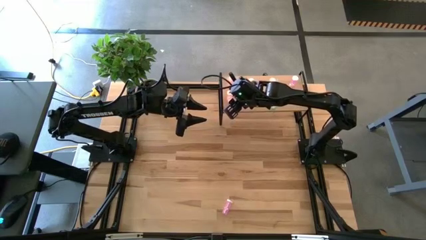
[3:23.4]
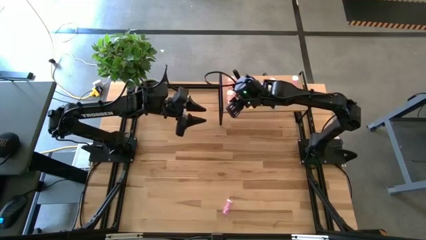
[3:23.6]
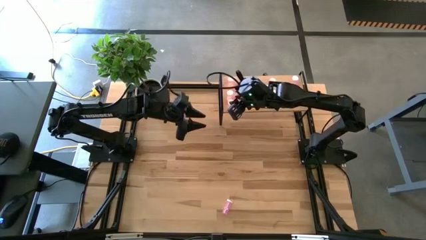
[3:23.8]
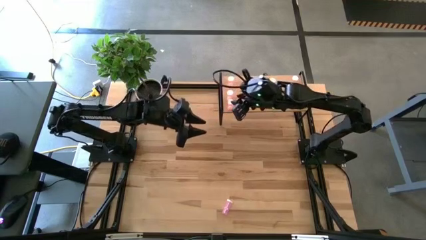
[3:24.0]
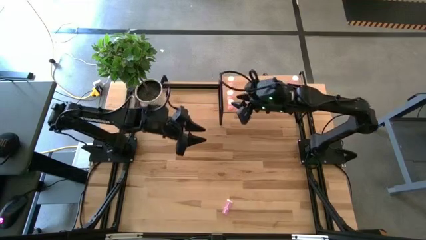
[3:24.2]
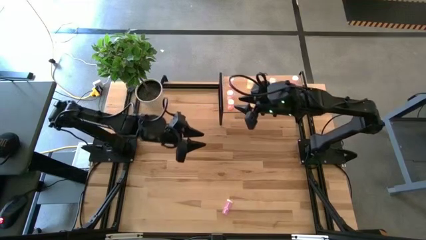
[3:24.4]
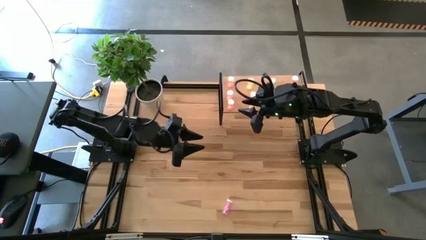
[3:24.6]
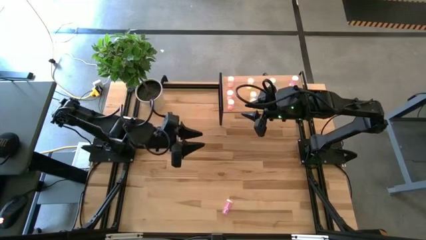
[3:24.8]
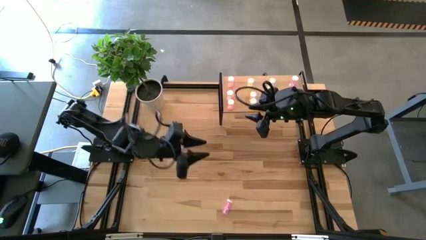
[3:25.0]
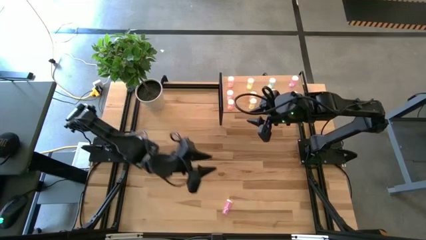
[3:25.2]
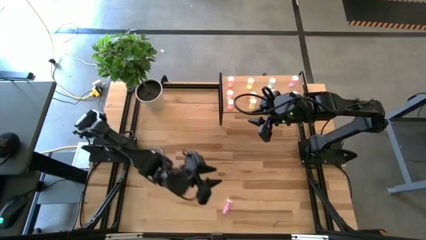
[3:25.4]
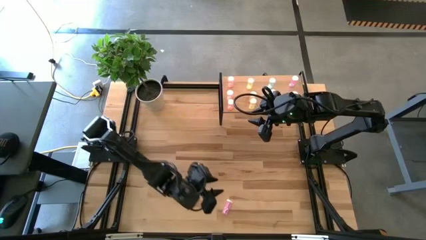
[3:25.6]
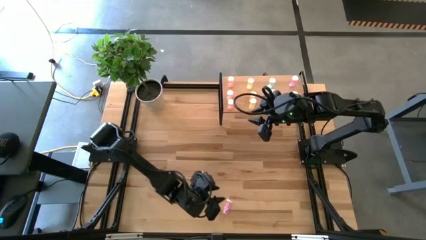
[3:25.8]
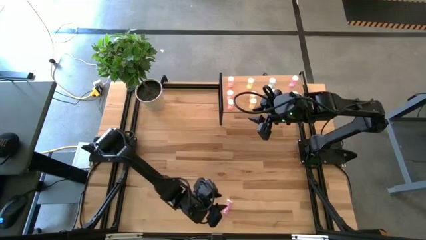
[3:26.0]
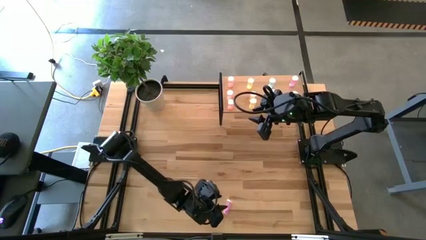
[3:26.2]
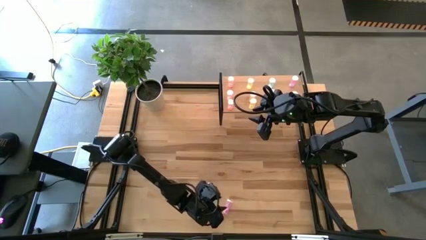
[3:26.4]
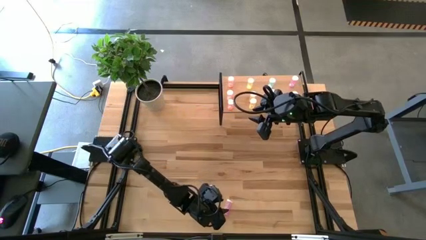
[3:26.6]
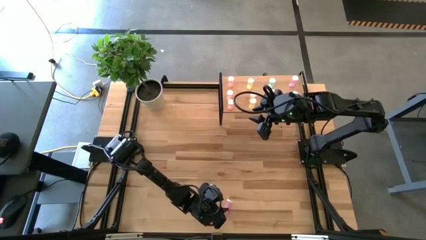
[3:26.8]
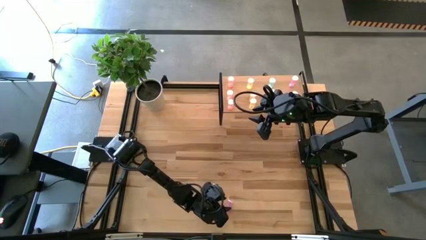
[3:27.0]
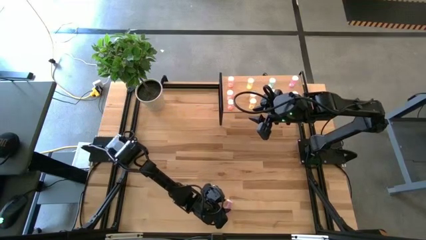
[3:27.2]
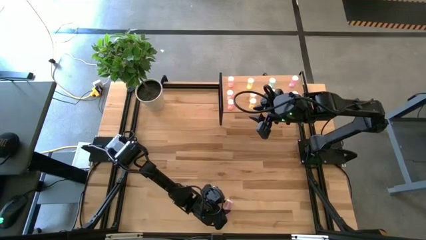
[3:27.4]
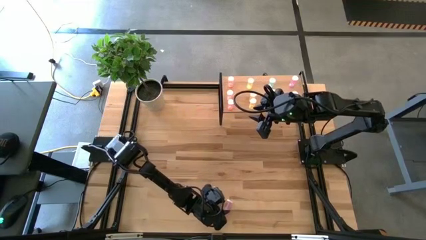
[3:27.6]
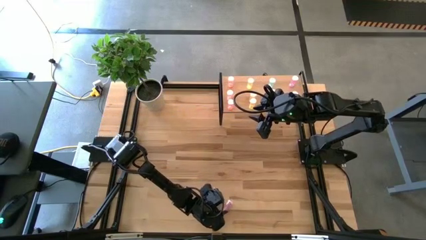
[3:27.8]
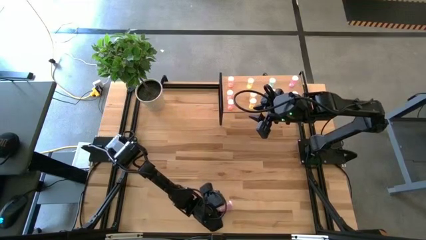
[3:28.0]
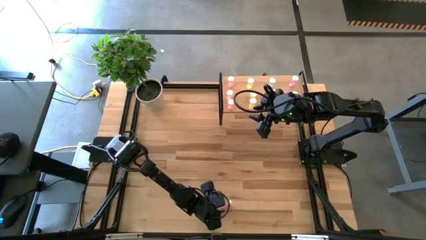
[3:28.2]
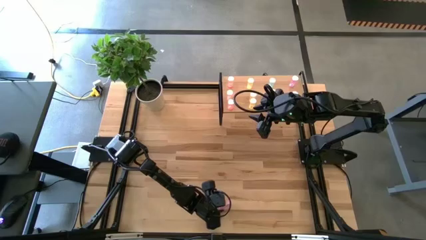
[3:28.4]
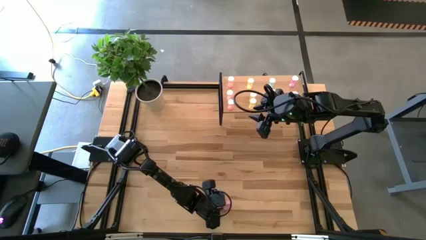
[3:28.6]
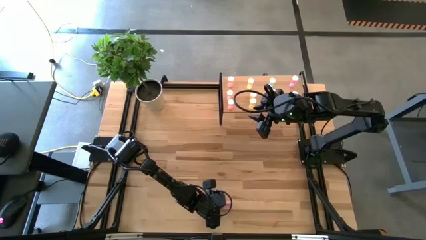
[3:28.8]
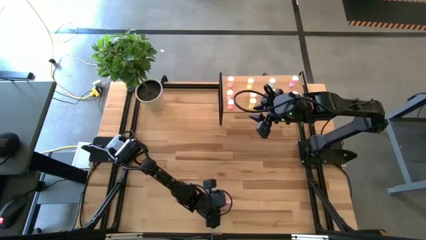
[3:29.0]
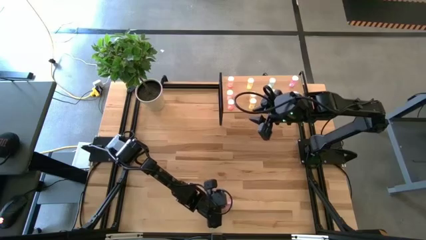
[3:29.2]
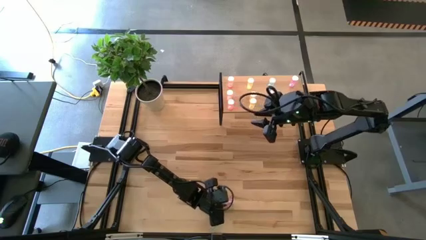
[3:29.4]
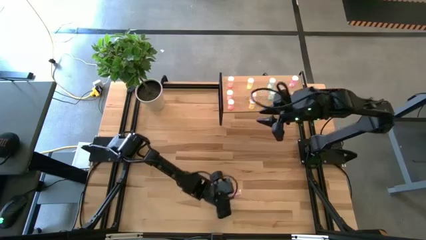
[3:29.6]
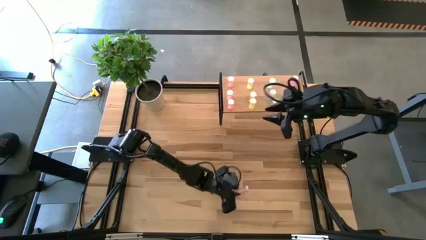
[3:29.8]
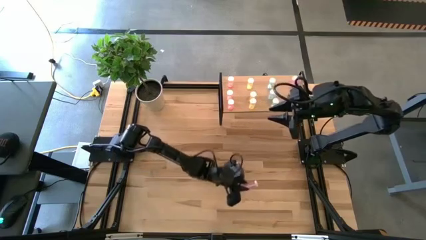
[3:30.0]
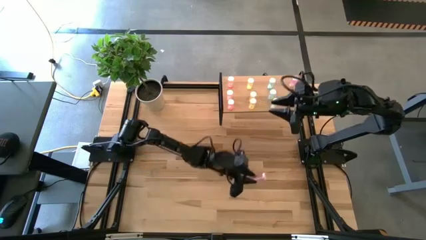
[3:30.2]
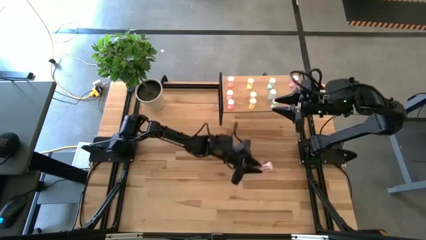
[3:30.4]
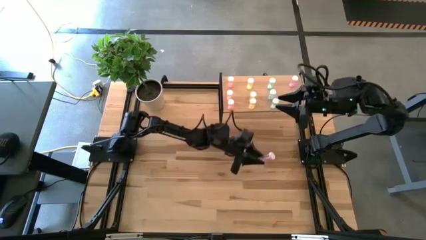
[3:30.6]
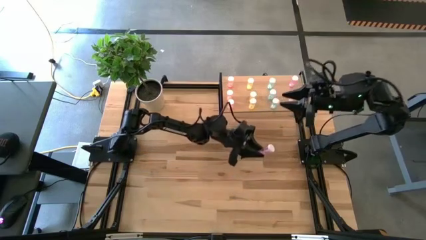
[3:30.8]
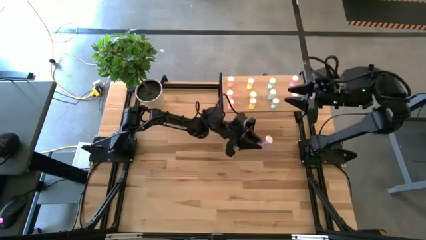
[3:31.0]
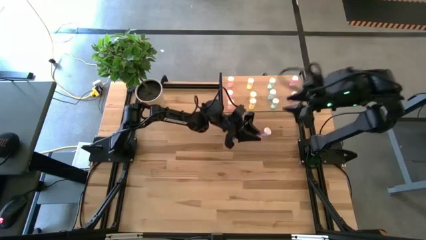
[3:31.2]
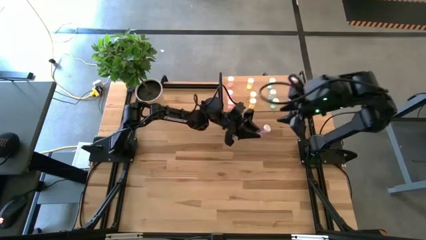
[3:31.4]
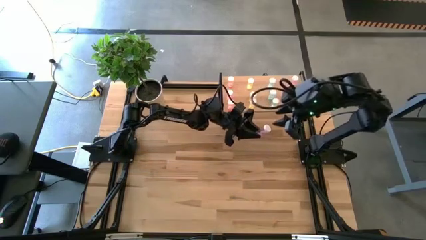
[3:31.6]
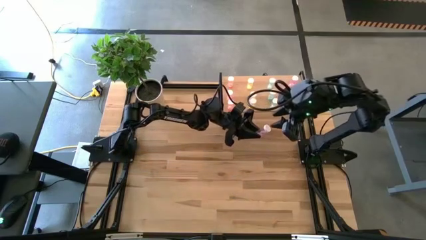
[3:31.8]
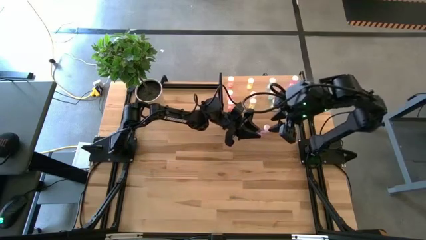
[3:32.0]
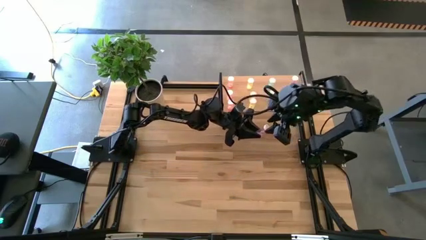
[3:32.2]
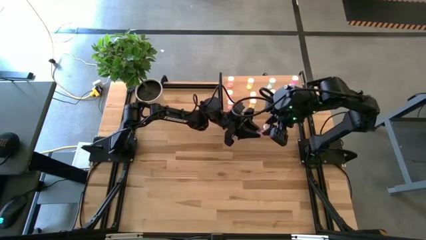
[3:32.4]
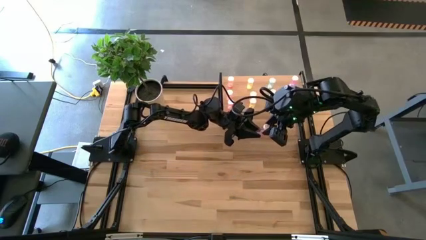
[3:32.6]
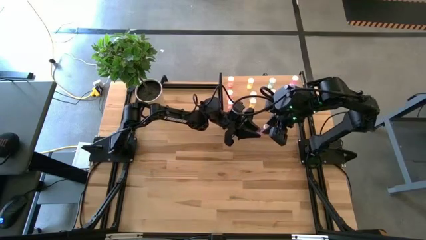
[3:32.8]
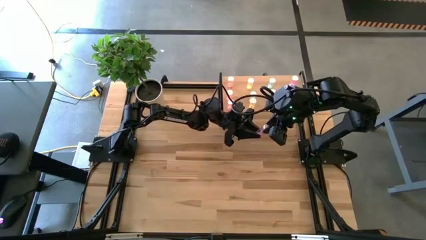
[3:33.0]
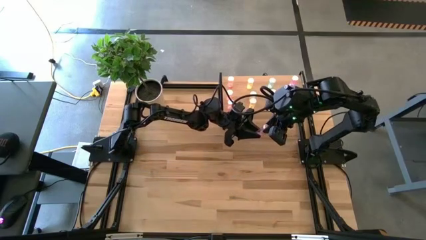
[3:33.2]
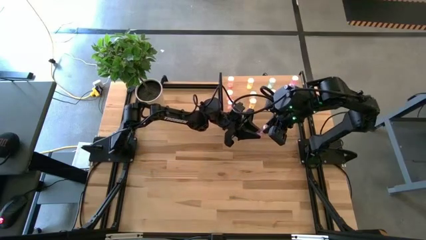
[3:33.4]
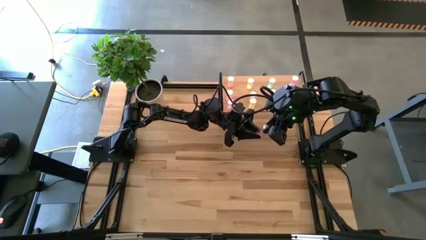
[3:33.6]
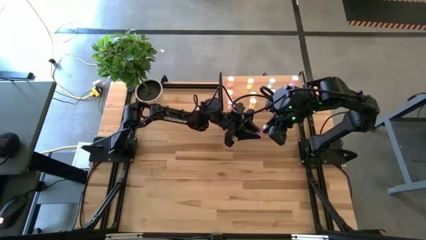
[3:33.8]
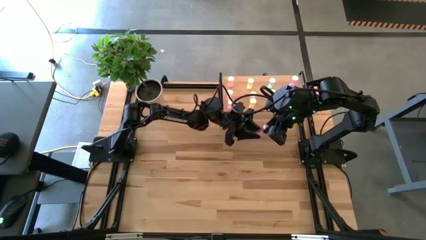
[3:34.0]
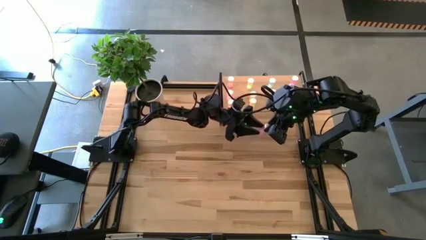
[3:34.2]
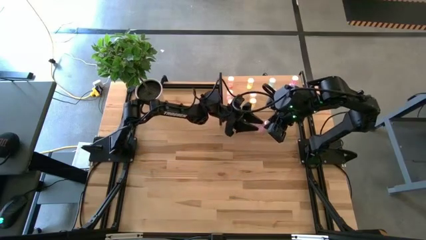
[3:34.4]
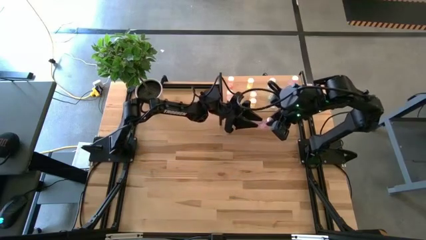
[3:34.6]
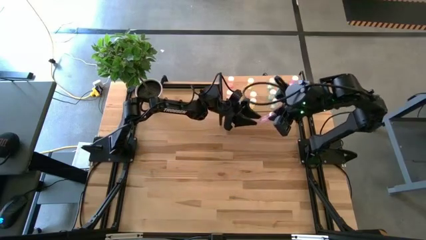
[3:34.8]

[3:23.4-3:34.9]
Task: Pick and place medicine bottles onto shelf by color
Put the purple pill bottle on the shelf aligned with the other purple pill bottles

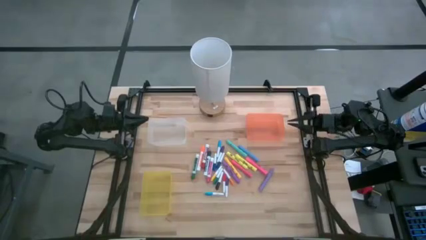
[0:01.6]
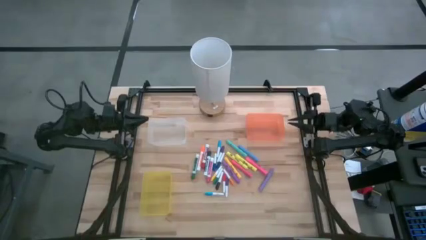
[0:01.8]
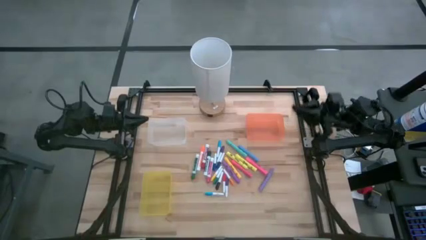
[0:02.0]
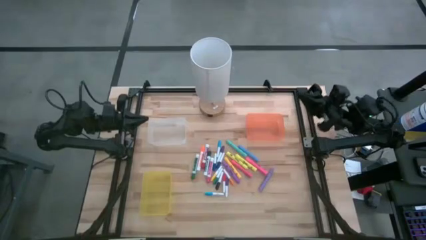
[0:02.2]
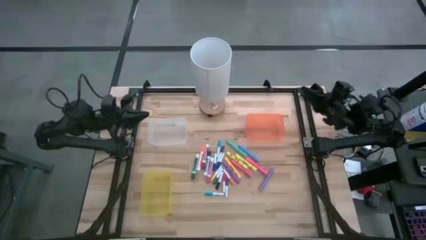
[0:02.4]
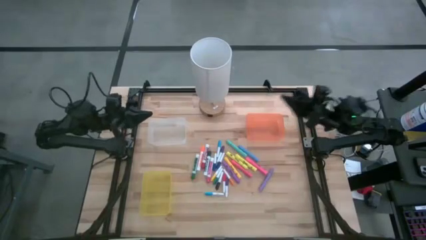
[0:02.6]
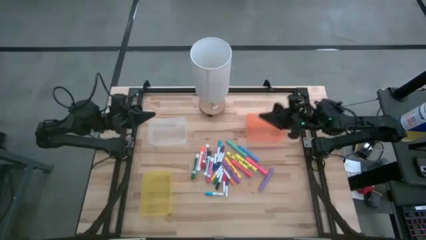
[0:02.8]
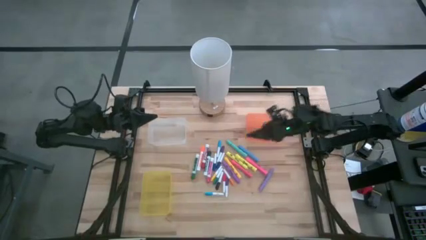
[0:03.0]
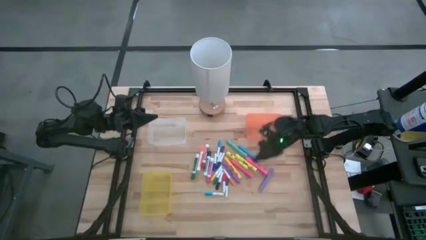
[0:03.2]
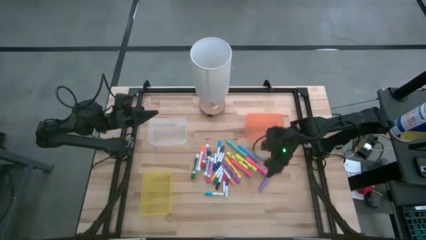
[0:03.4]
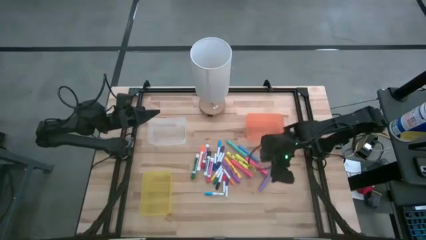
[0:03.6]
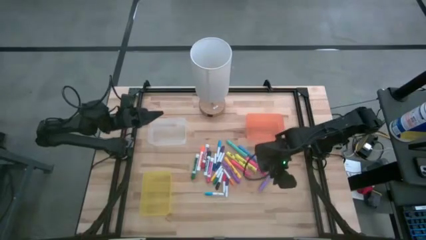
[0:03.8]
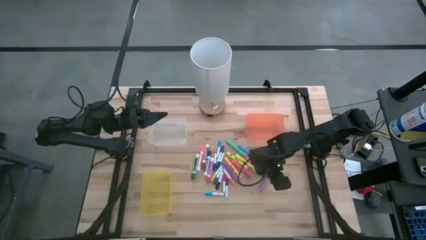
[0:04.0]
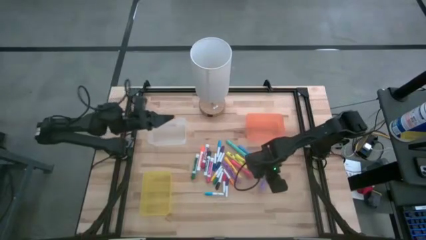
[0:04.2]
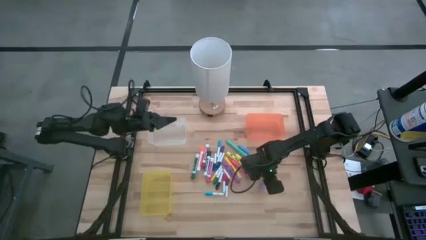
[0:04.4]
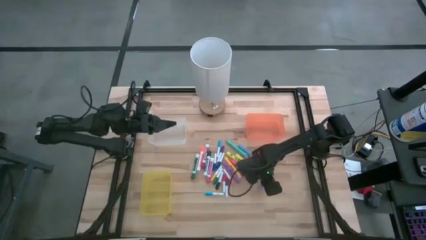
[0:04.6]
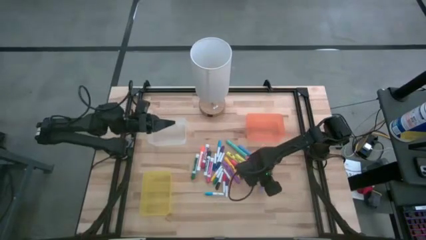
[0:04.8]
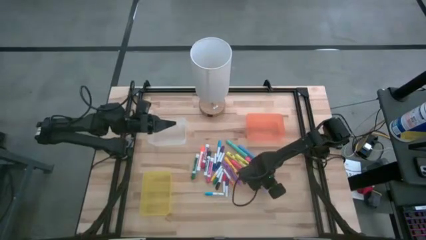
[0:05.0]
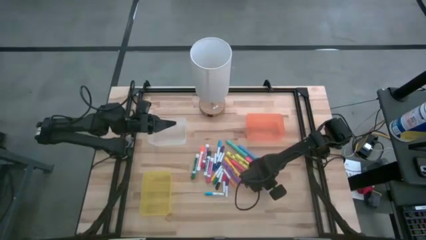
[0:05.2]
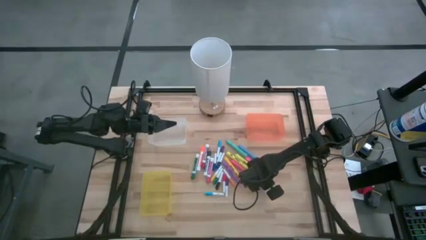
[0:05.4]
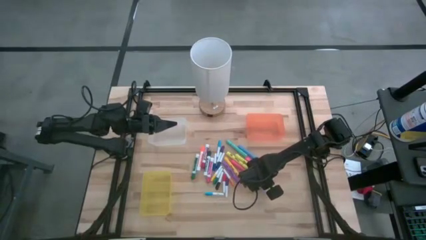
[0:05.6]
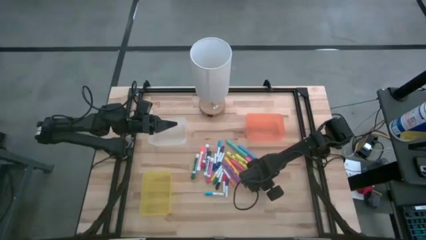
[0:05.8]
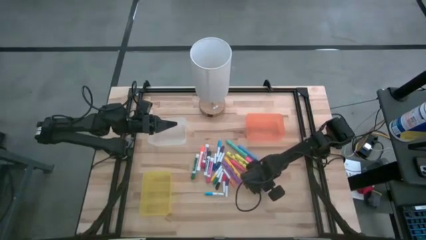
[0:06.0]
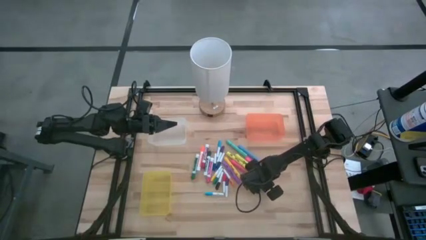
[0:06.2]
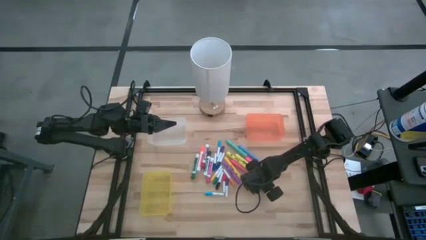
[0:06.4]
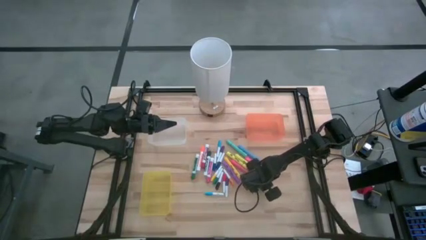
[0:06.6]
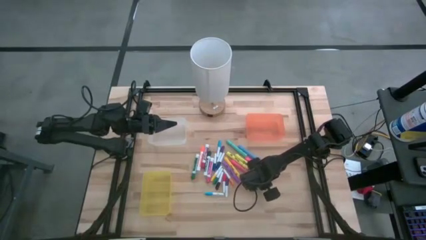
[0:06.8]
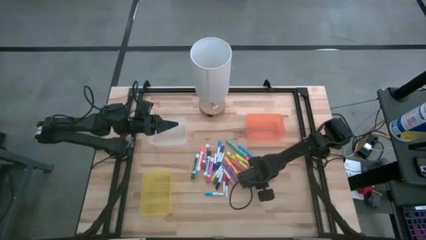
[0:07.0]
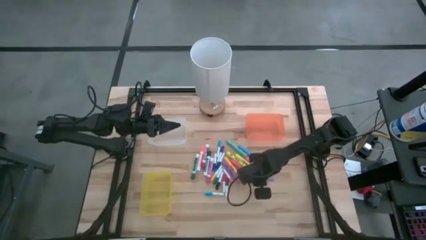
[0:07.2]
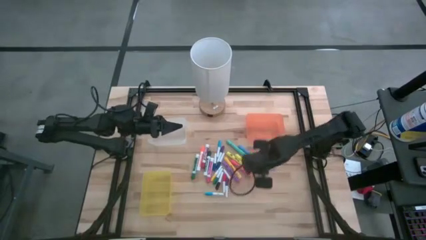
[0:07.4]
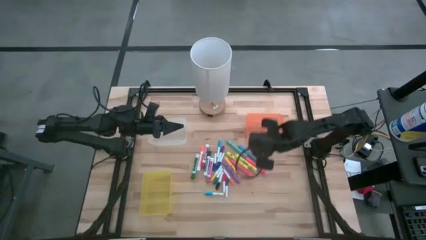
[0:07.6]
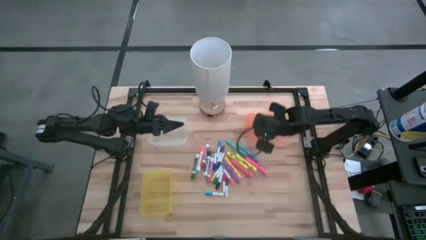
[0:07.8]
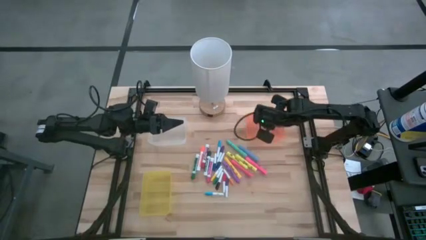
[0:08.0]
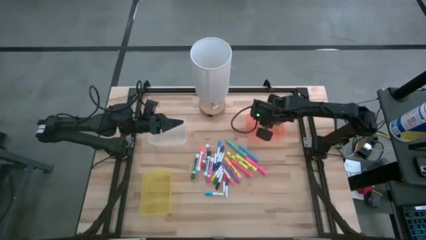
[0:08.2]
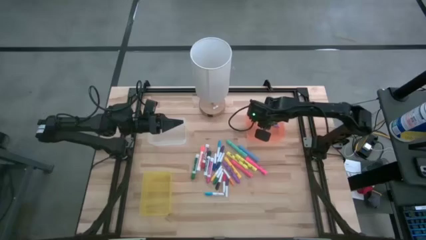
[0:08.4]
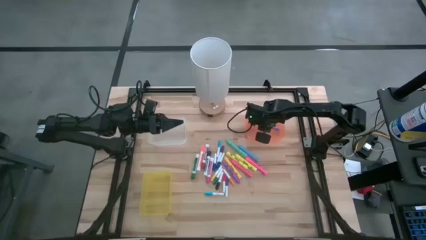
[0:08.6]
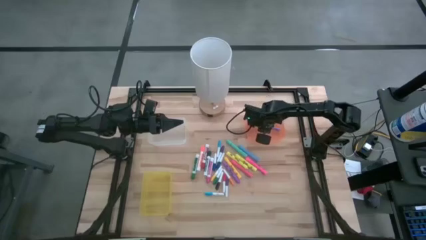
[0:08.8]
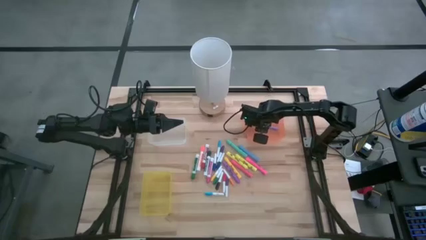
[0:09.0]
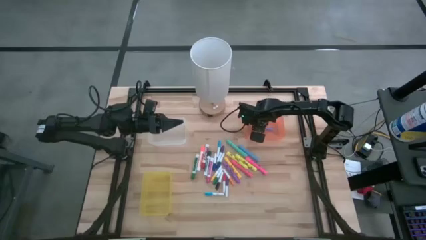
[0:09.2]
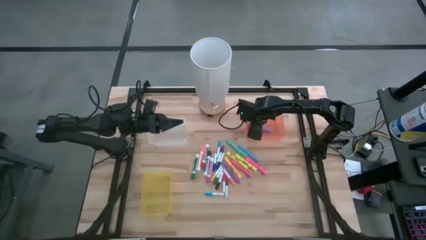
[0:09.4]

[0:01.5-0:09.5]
Task: Pick & Place Markers
Put the right purple highlighter pen into the orange bin
